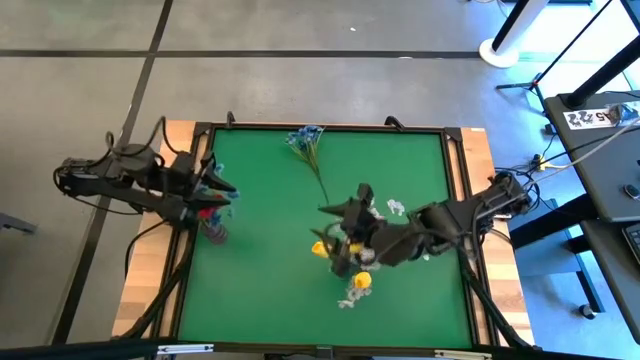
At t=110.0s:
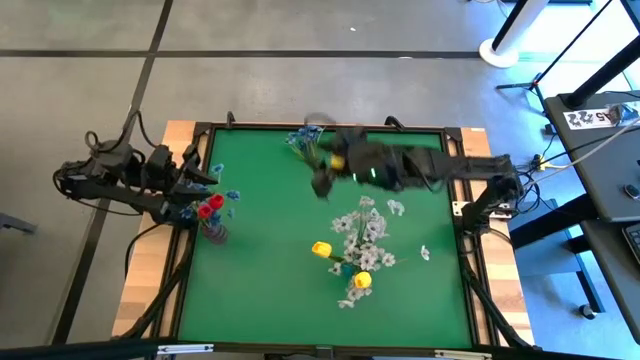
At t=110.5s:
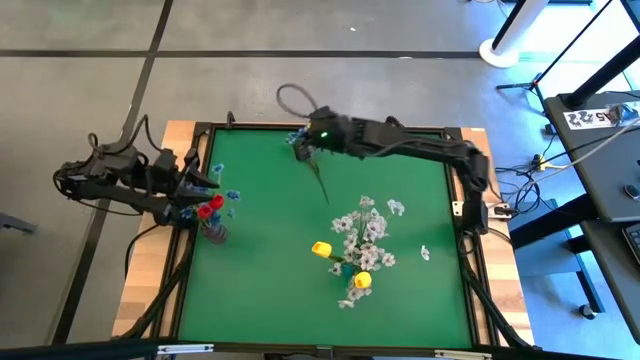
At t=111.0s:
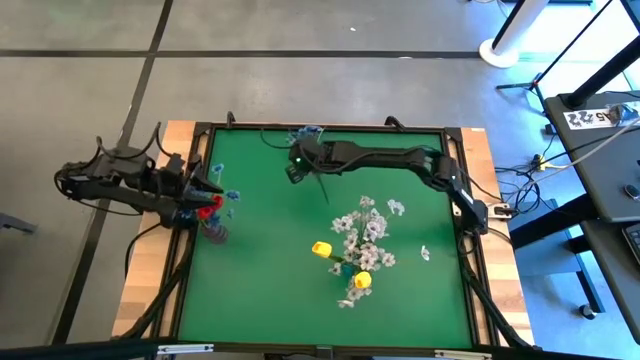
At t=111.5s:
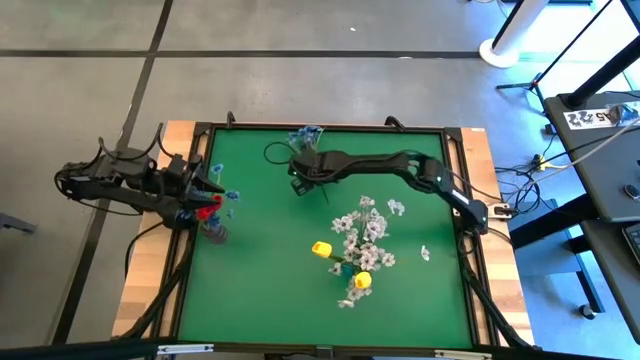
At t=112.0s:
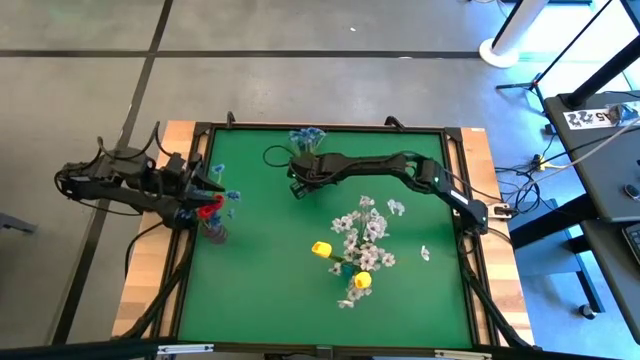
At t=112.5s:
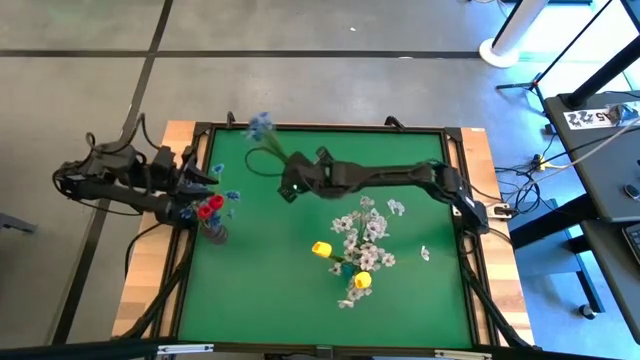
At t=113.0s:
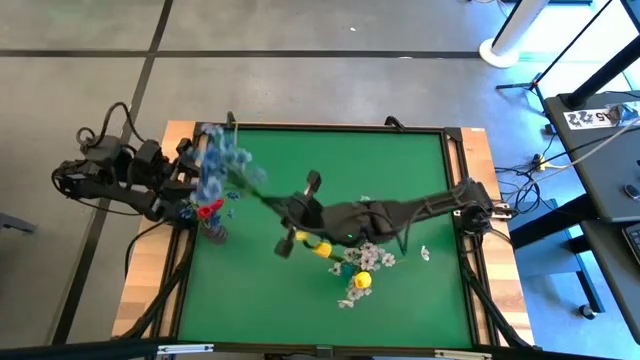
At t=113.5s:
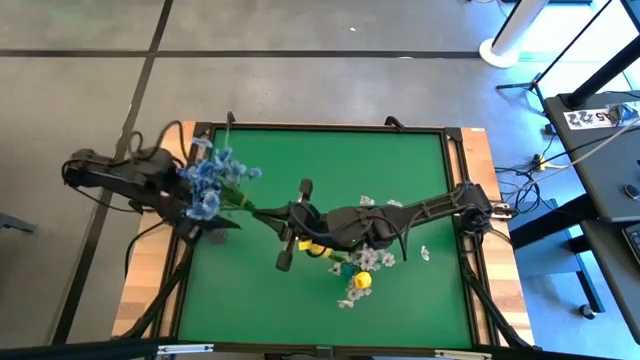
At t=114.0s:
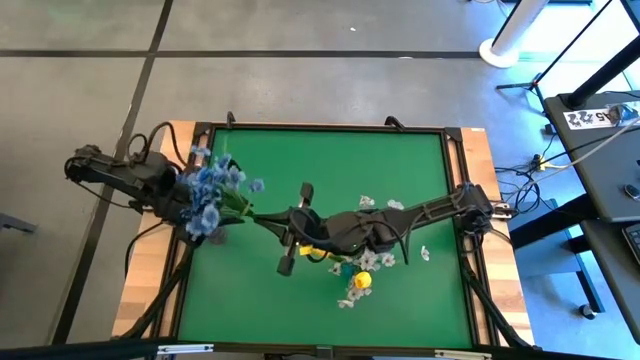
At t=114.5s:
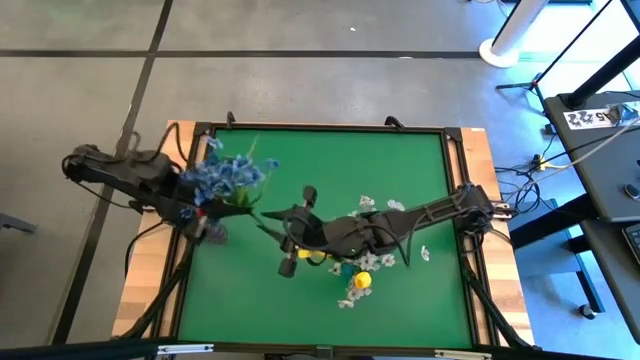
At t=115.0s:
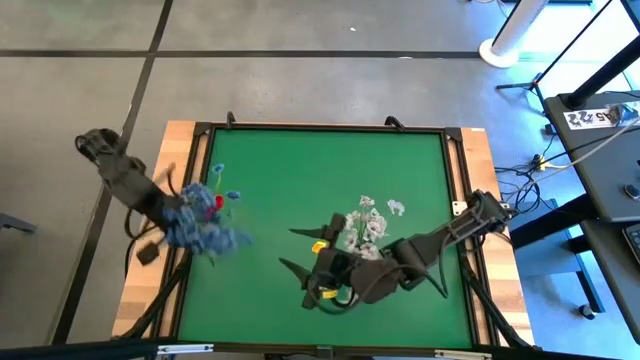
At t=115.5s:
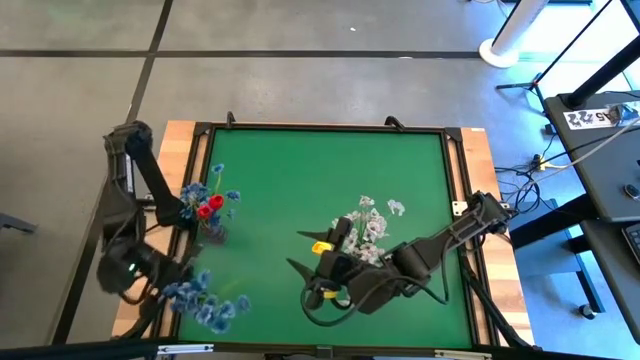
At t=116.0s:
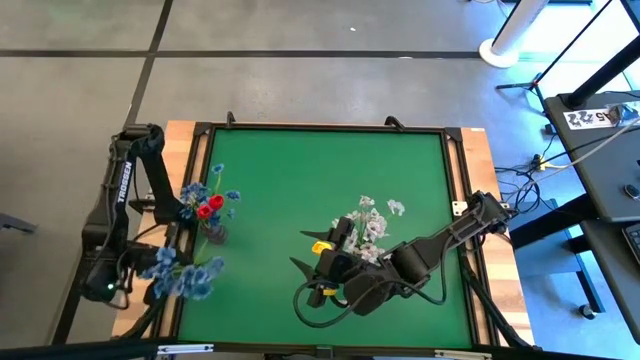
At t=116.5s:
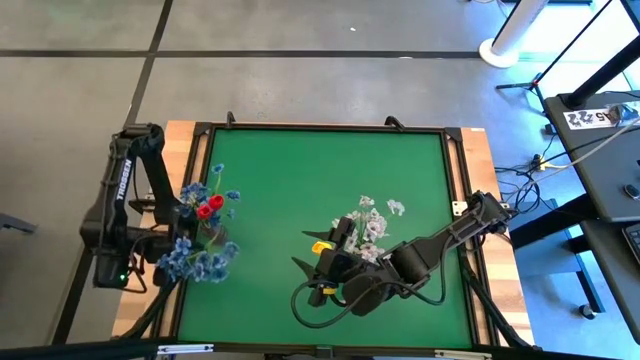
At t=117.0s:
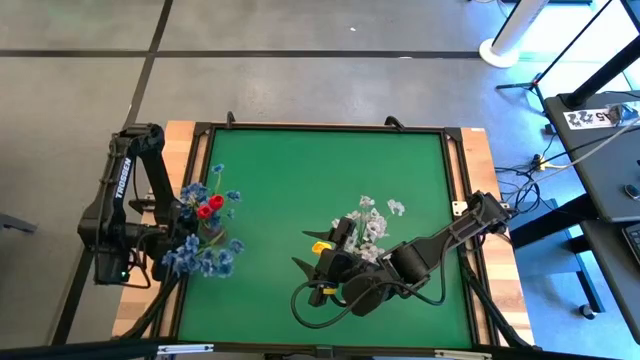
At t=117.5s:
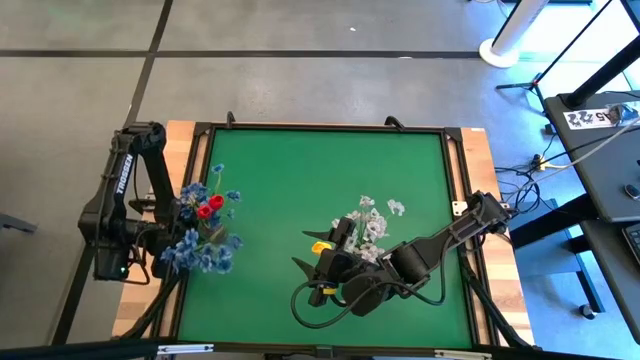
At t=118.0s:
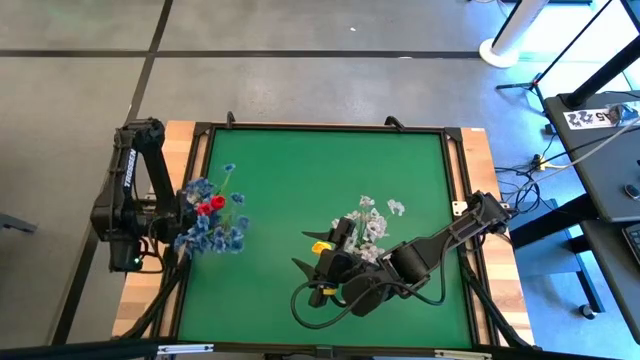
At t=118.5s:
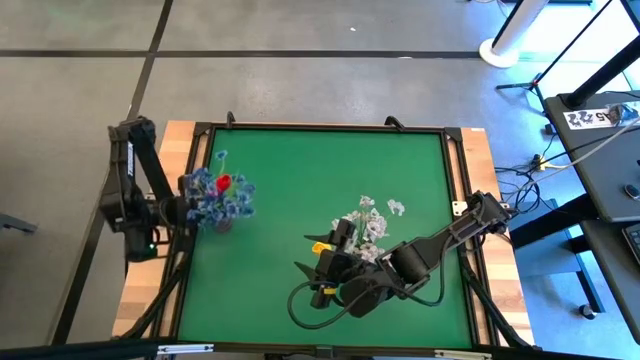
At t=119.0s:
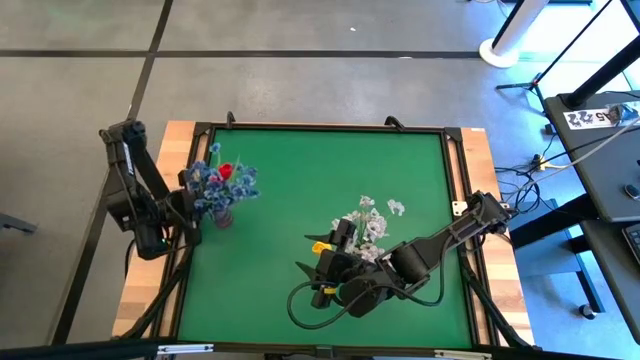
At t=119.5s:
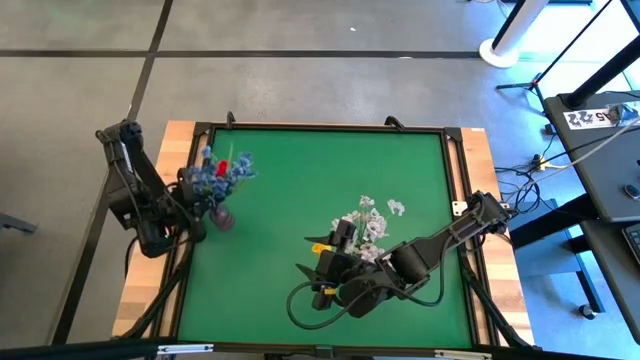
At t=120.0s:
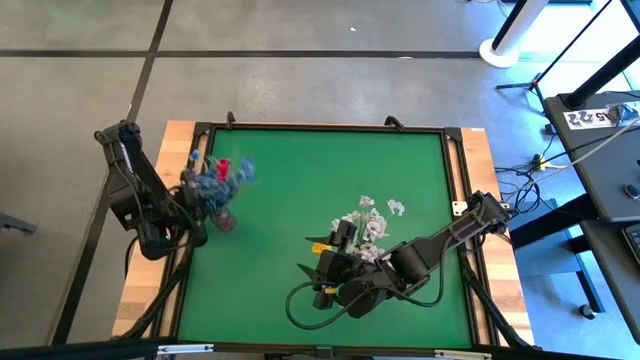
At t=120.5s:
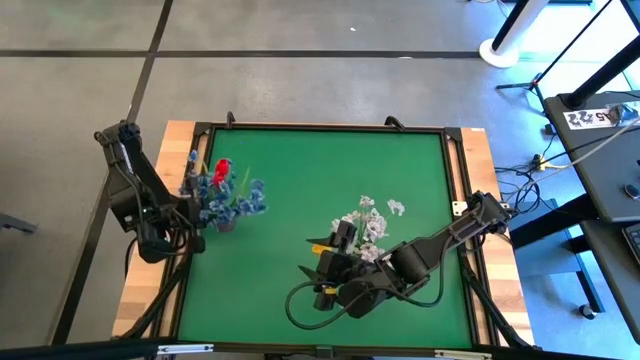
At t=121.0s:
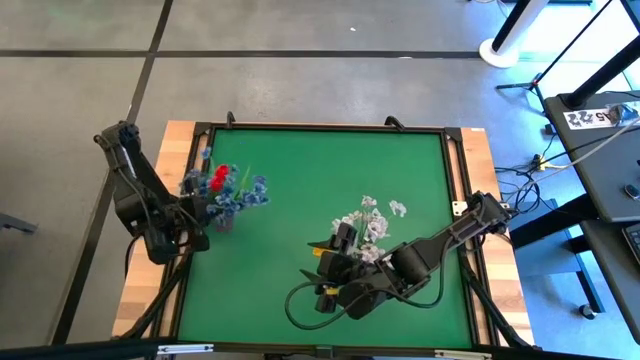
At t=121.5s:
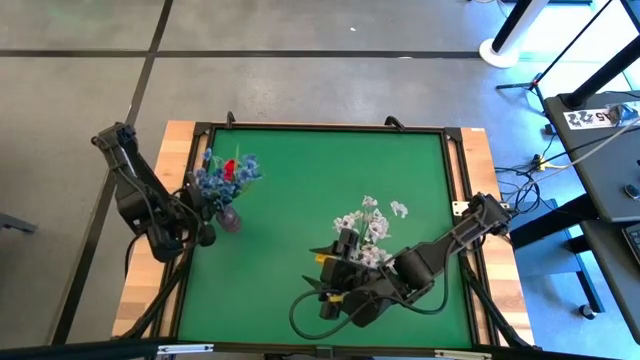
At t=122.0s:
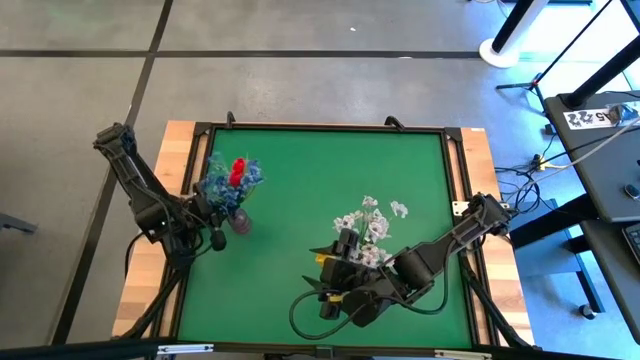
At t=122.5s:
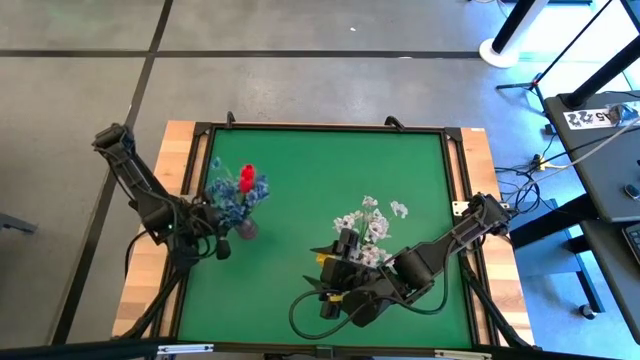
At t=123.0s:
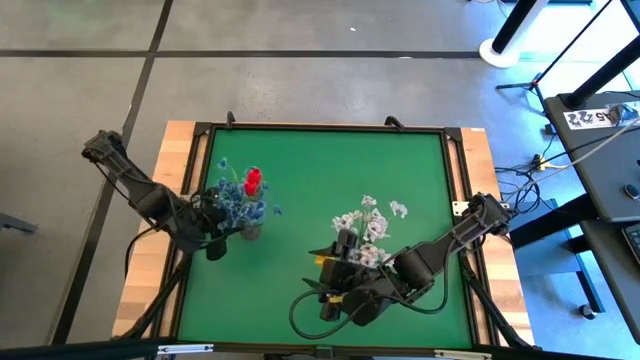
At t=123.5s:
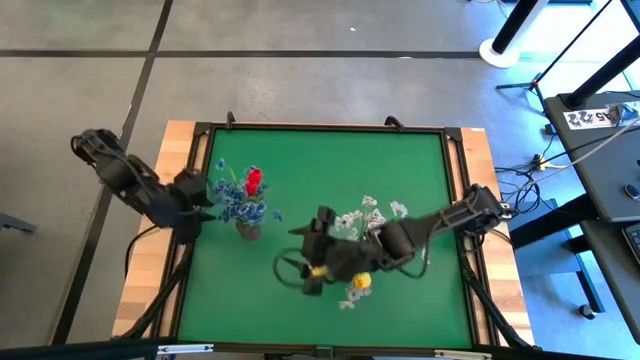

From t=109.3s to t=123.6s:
Task: Sort flowers into vase by color
Put the blue flower into the purple vase

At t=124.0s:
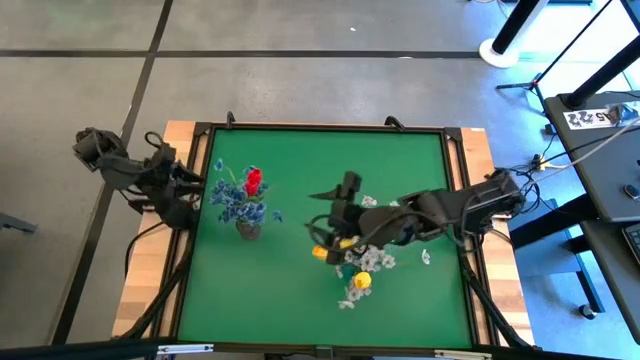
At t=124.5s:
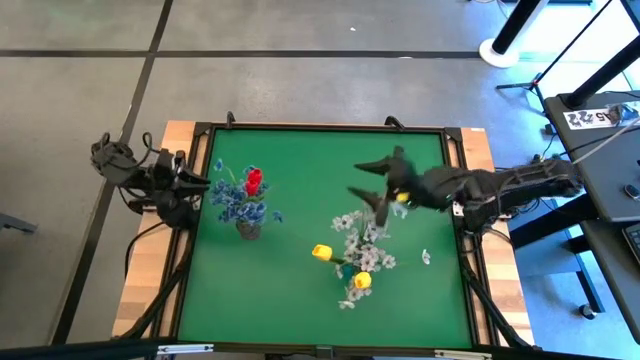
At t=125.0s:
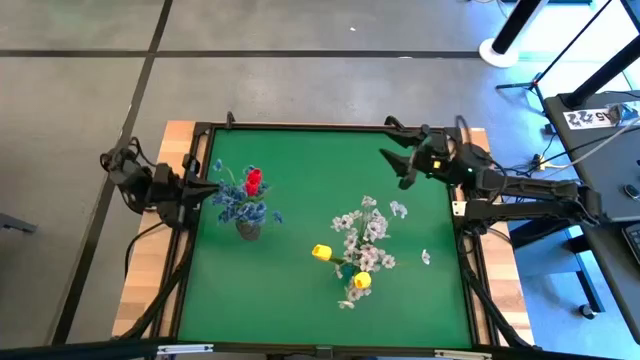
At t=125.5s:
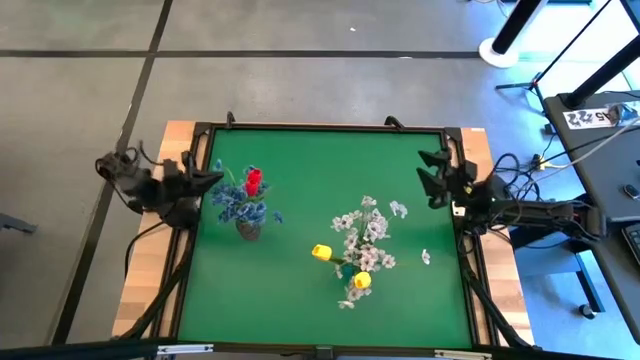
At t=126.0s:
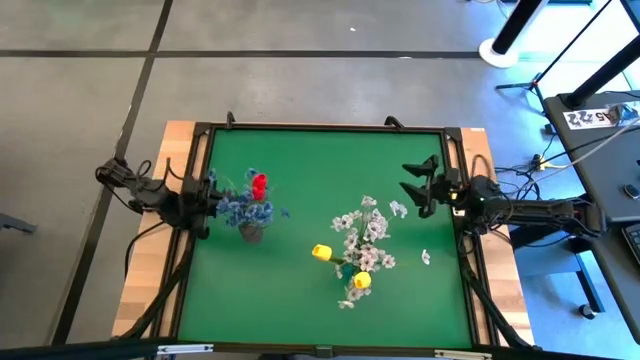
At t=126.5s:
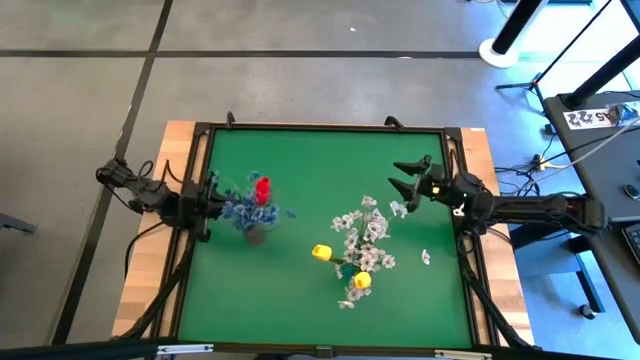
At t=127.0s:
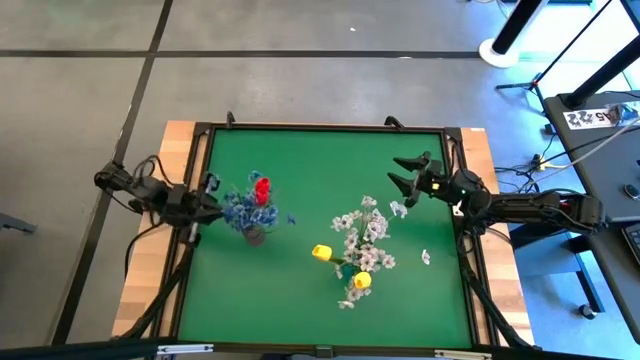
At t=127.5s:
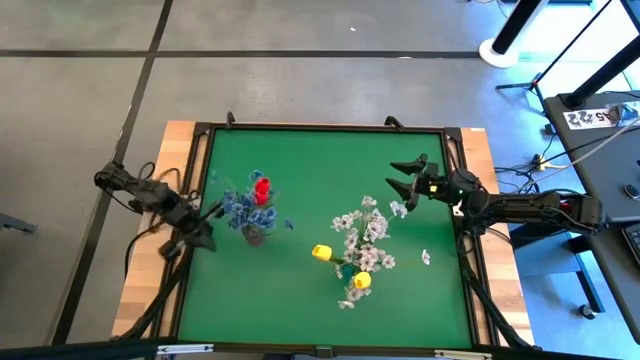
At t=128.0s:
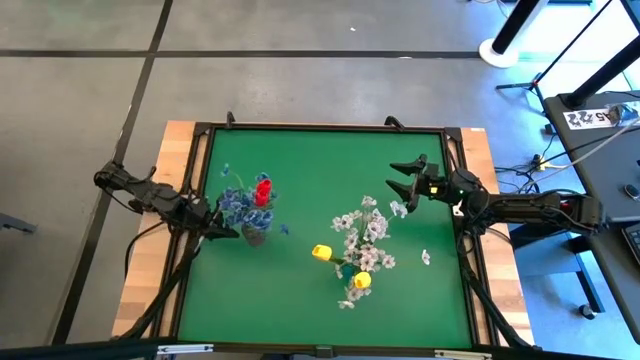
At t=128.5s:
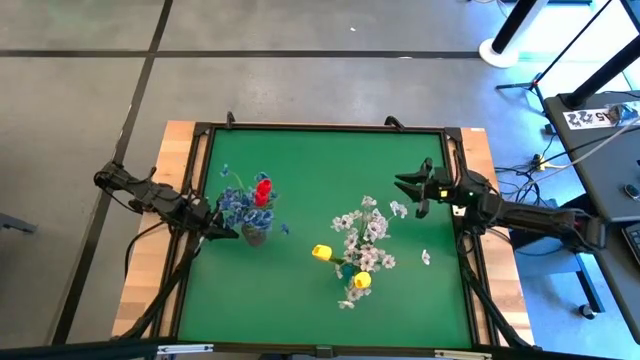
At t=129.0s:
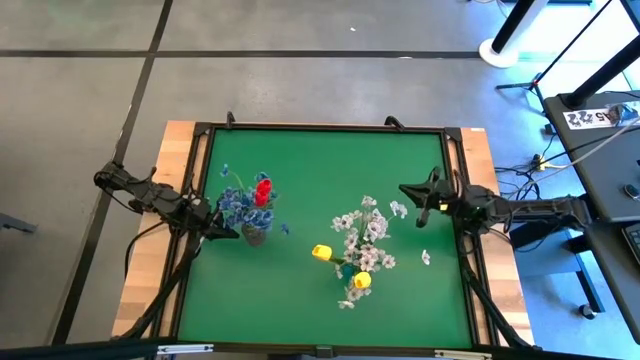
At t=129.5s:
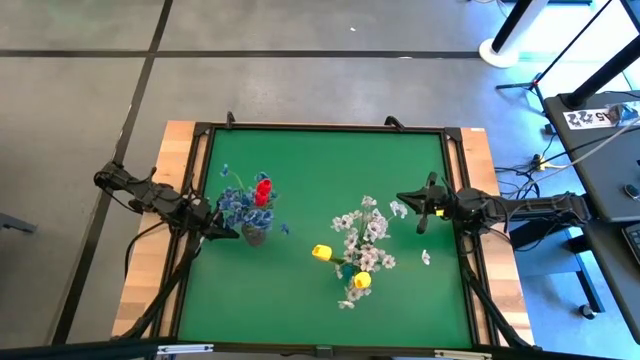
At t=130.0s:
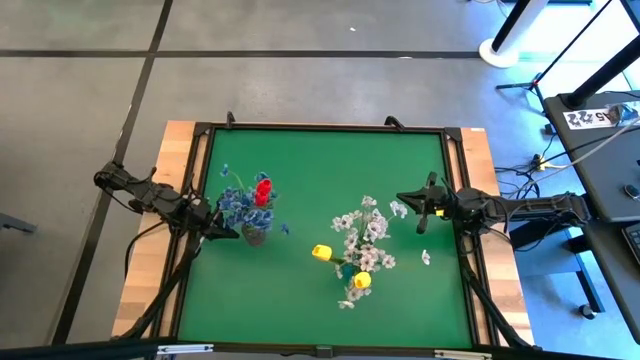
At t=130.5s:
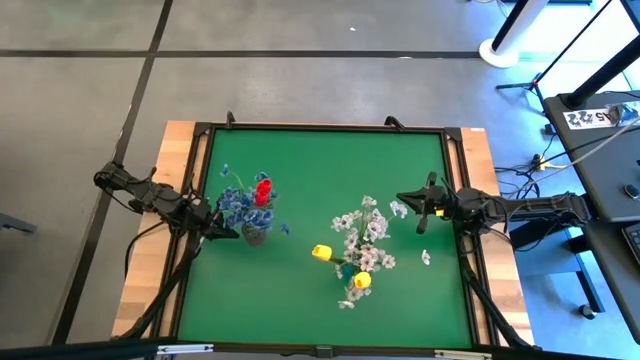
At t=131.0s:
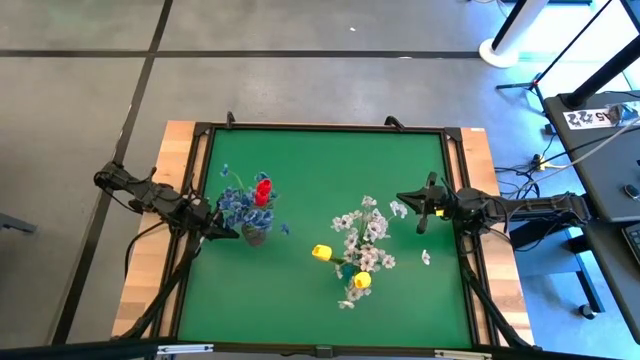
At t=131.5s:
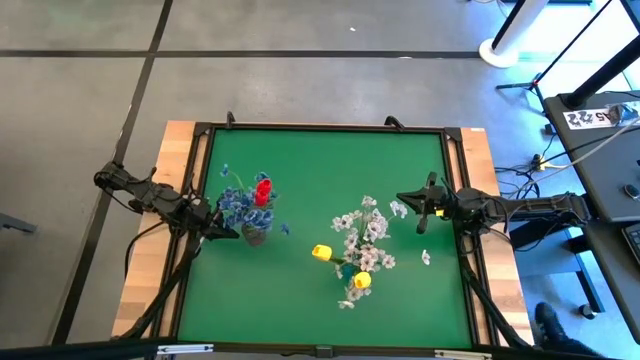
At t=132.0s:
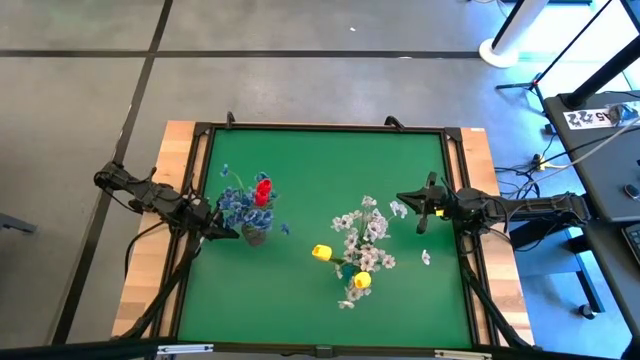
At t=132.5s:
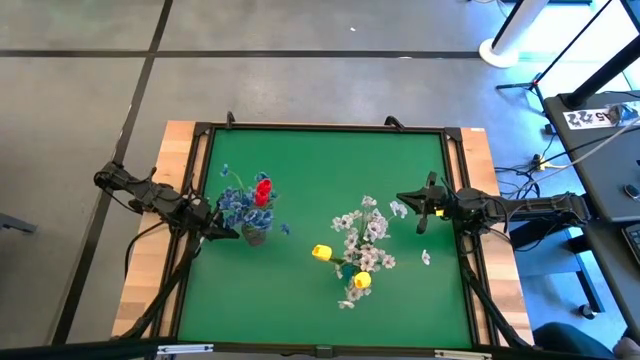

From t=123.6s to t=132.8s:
Return to home position
